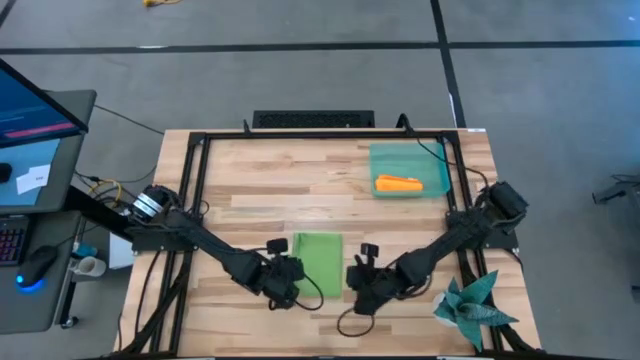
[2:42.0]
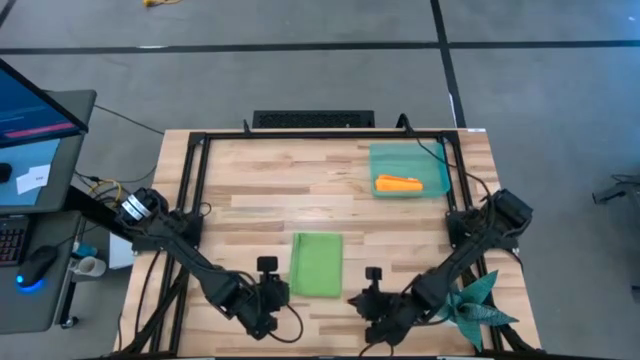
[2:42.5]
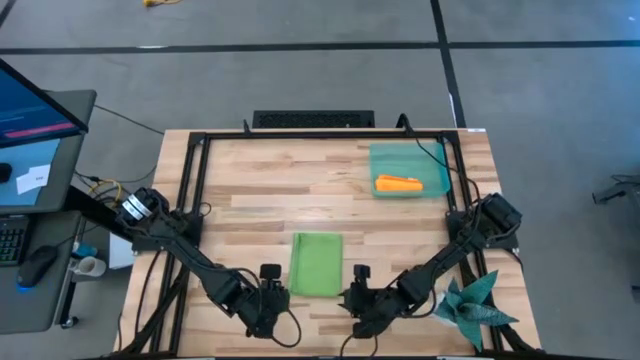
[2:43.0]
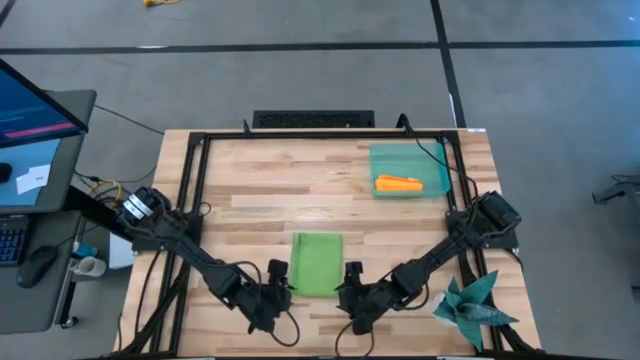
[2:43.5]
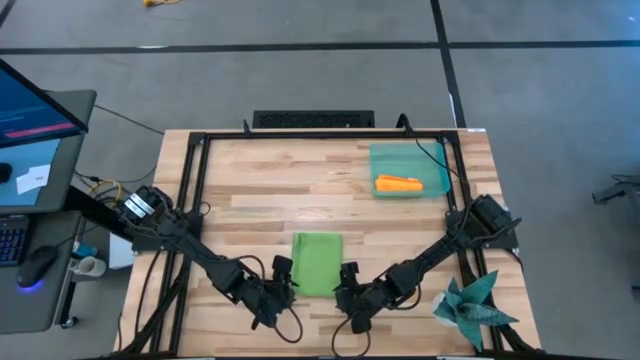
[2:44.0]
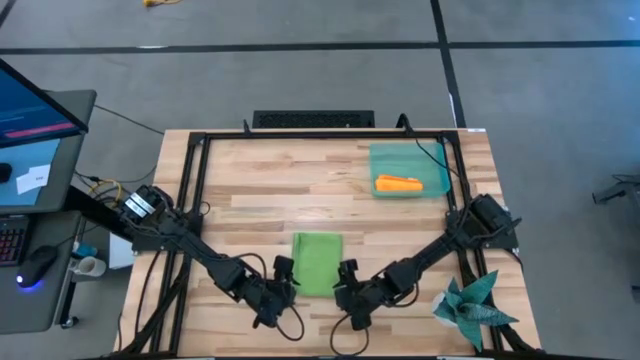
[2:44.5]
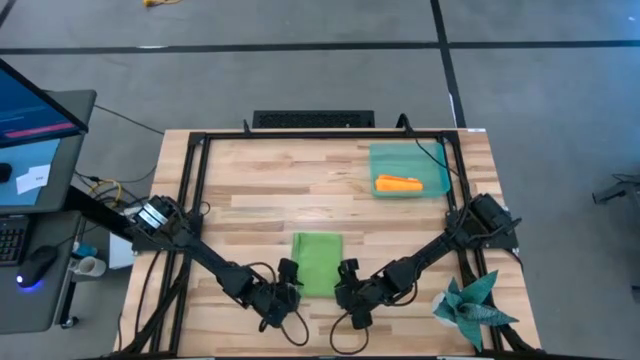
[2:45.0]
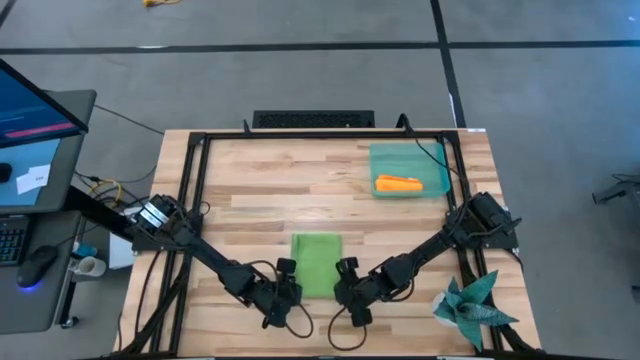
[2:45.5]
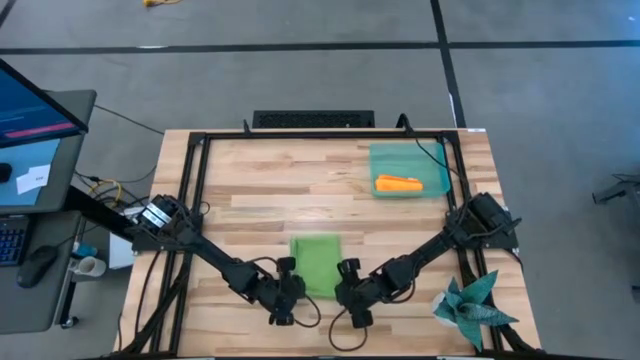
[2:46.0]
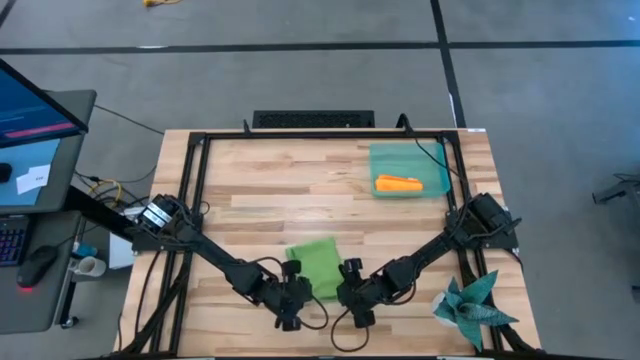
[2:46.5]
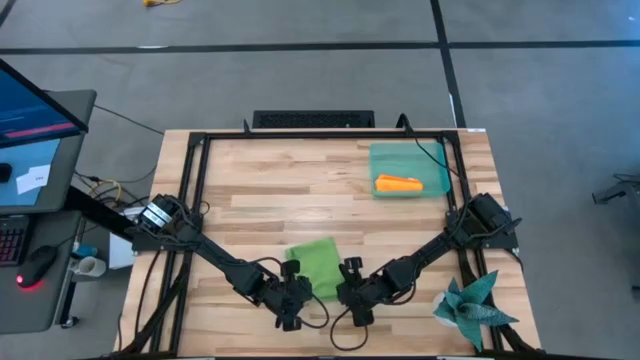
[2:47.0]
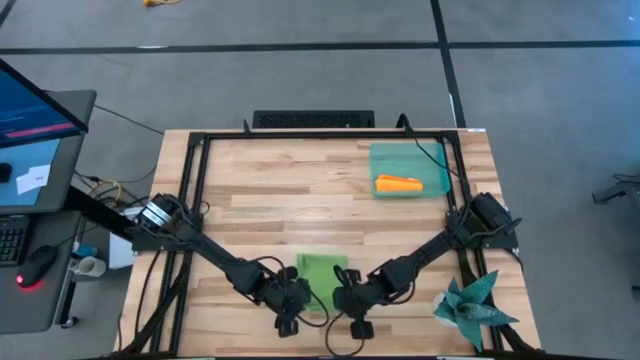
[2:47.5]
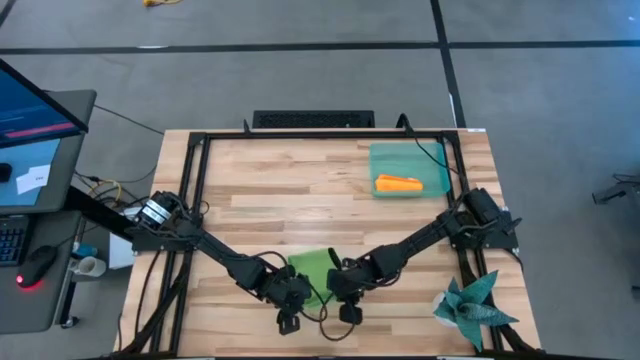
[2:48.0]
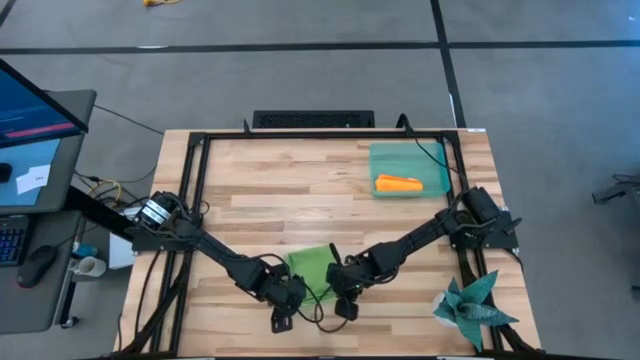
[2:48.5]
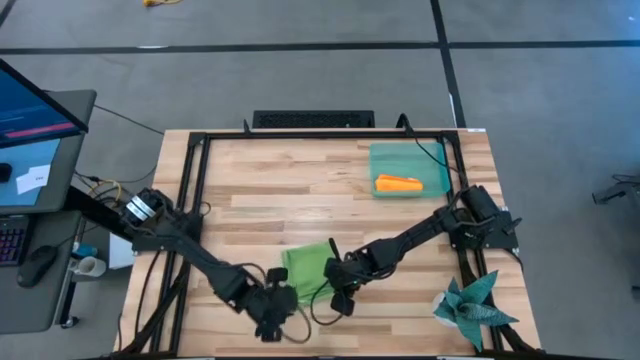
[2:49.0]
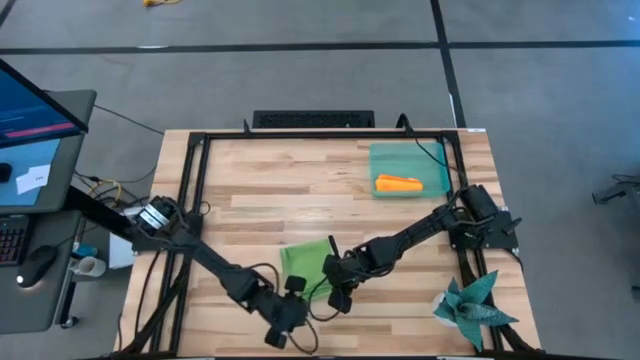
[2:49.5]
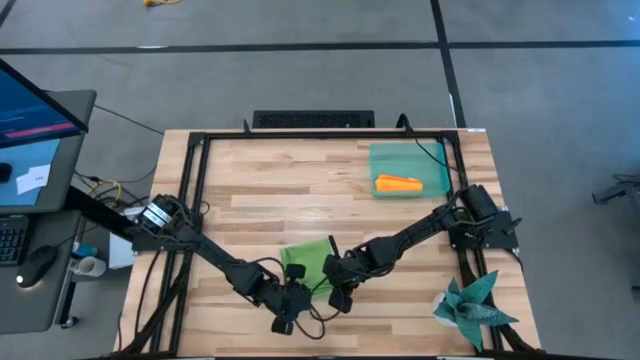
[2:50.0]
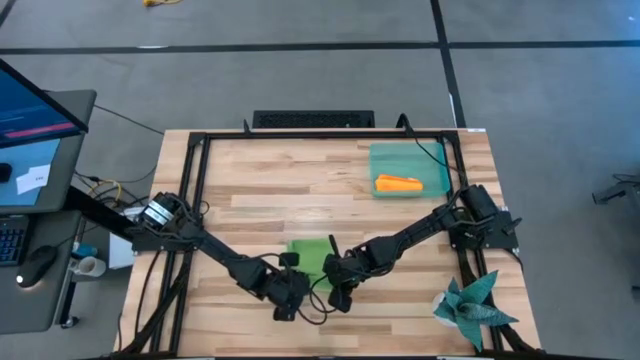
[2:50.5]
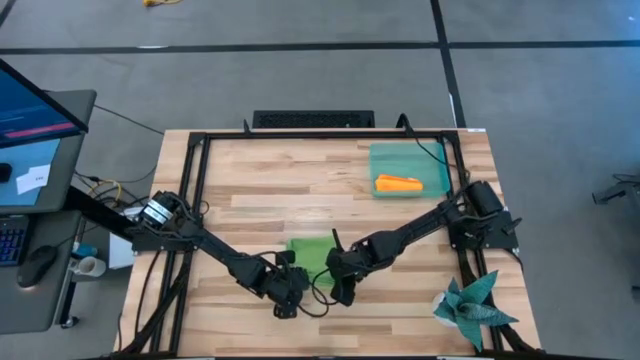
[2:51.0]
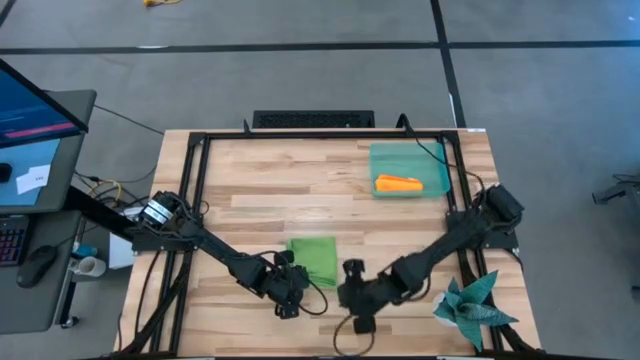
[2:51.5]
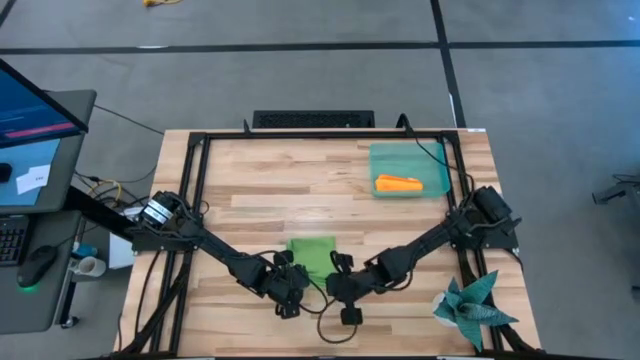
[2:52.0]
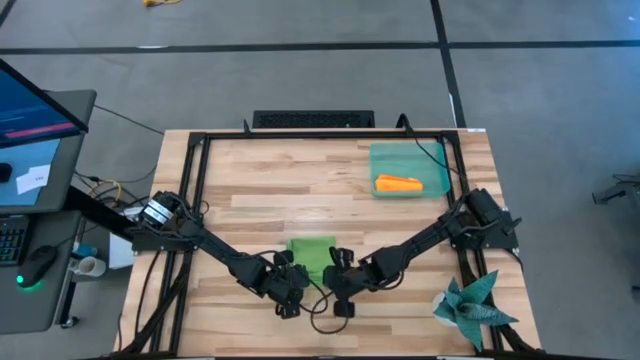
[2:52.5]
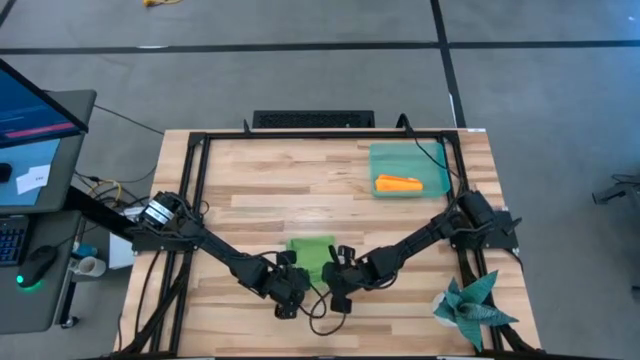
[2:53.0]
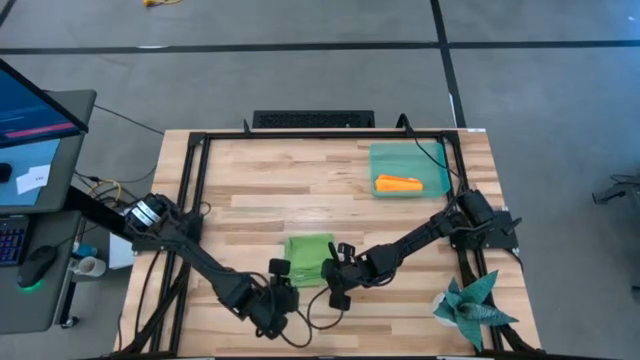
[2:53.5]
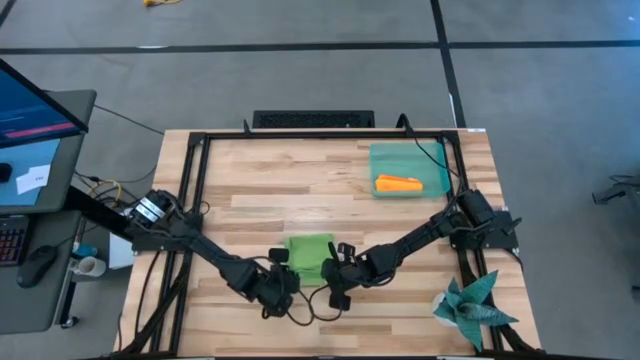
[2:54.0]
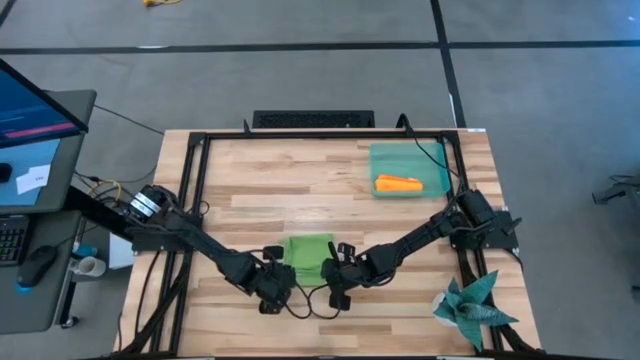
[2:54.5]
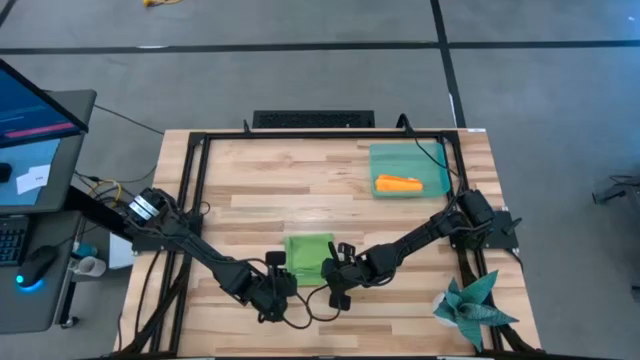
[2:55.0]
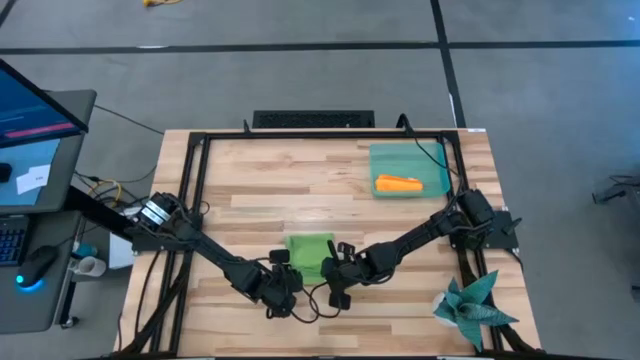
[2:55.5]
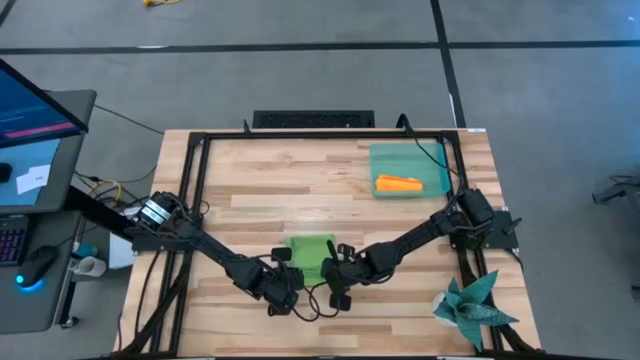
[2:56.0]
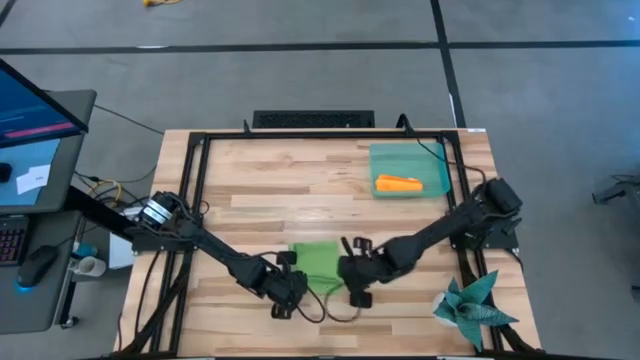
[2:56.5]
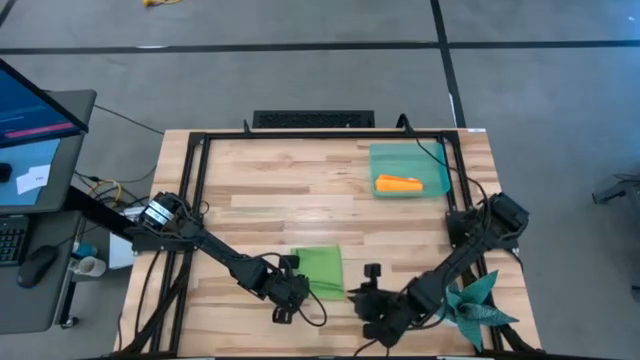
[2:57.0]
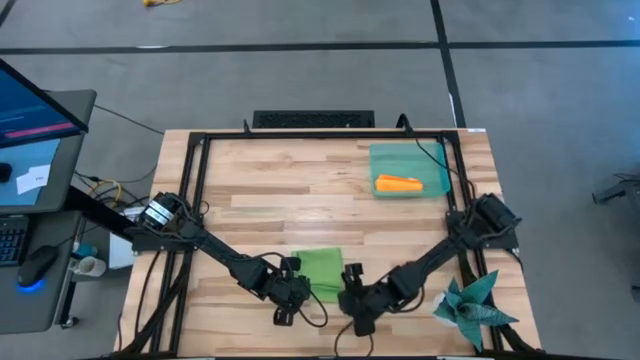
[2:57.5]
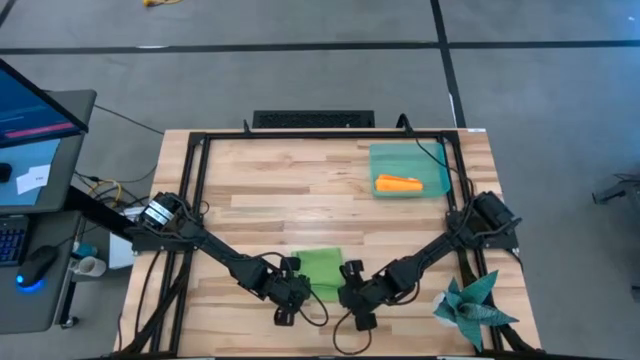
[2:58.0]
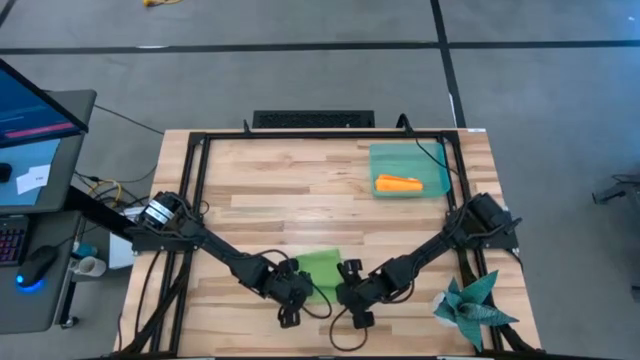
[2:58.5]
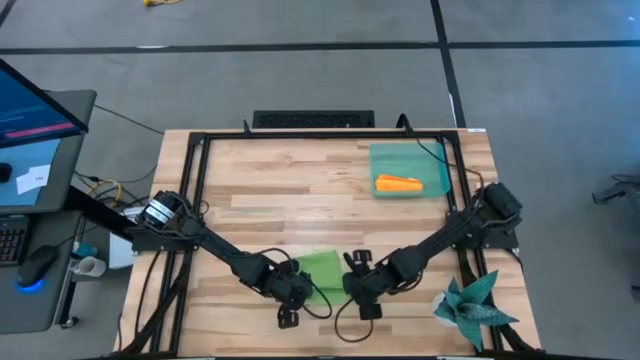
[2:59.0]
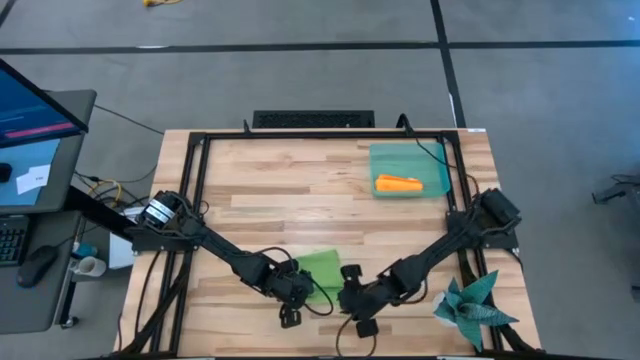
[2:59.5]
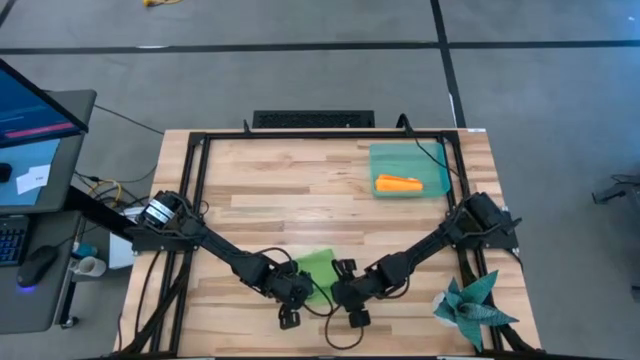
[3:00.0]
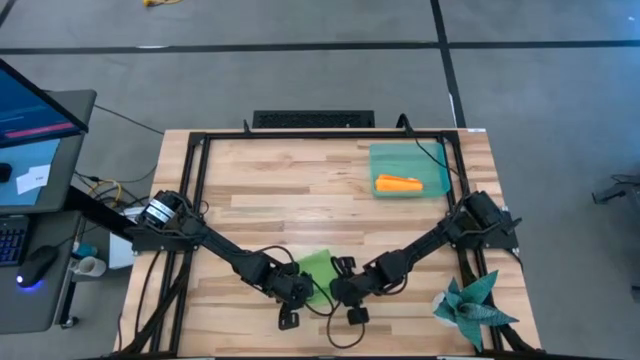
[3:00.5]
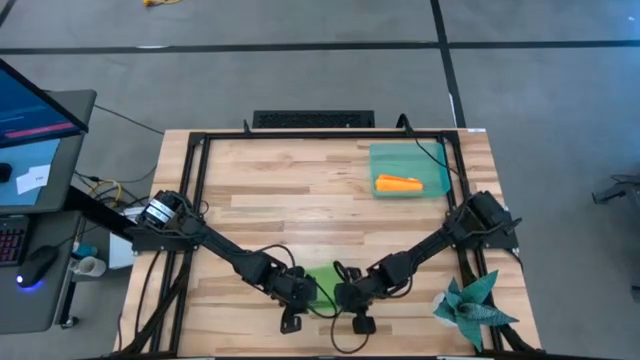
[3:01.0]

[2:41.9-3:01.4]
Task: Roll microfiber towels into tight, uniform cylinder then place into a basket
Roll the green towel
